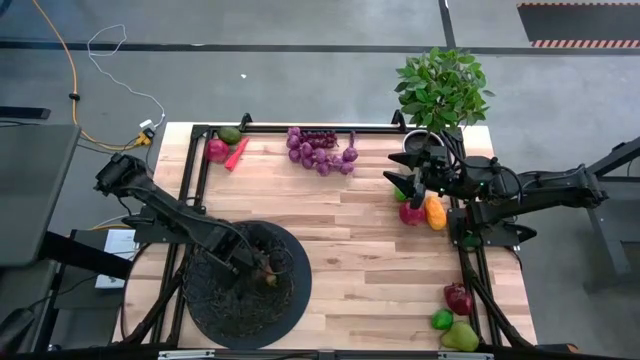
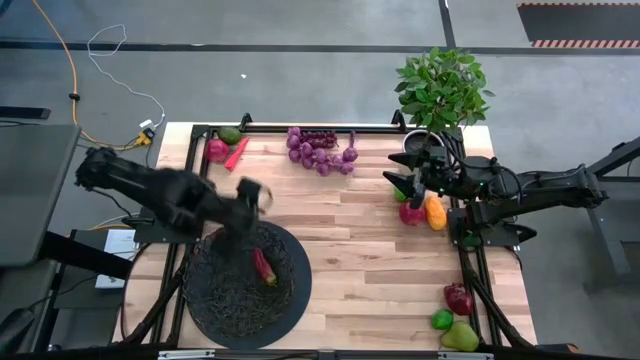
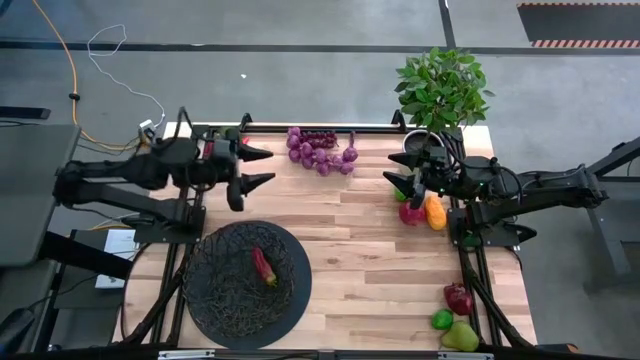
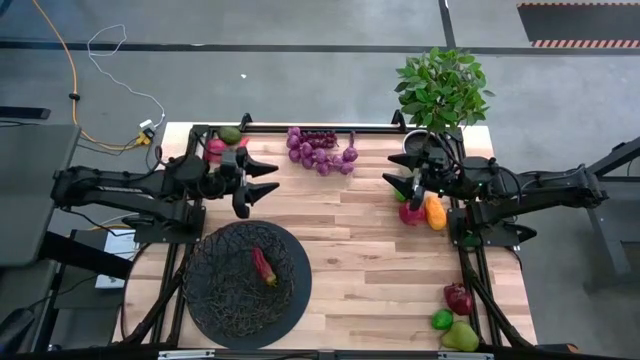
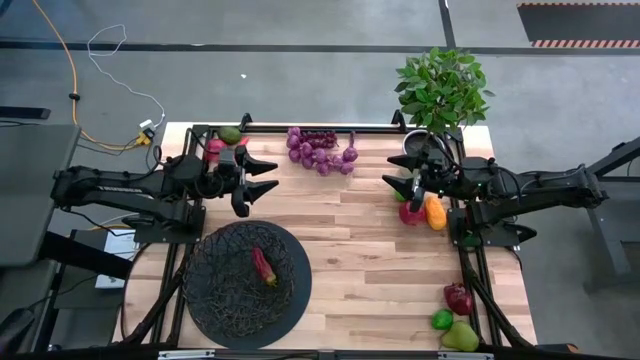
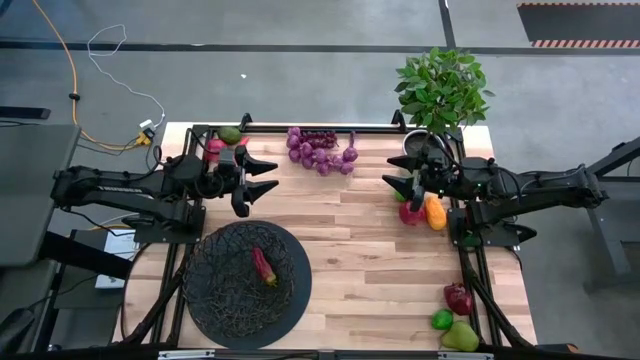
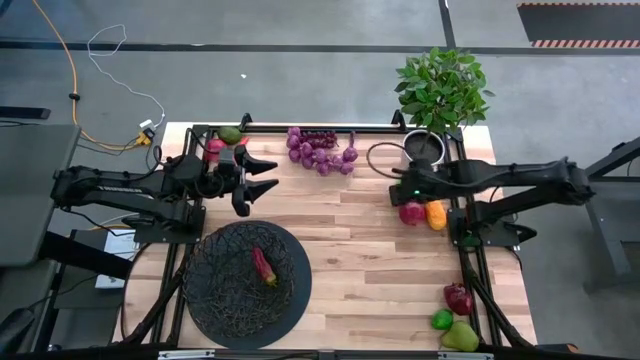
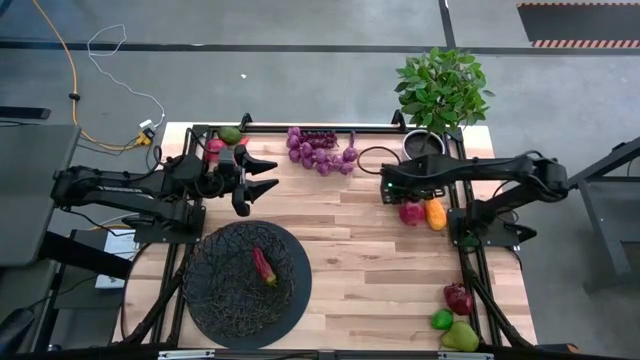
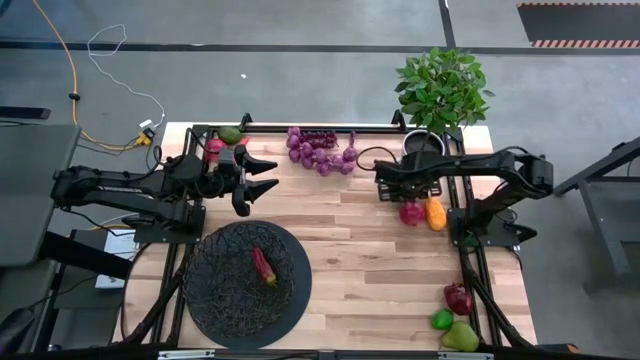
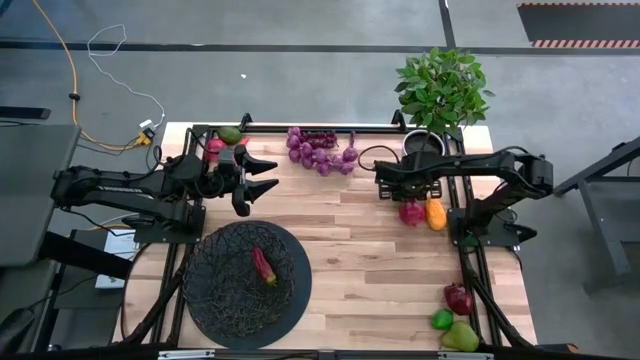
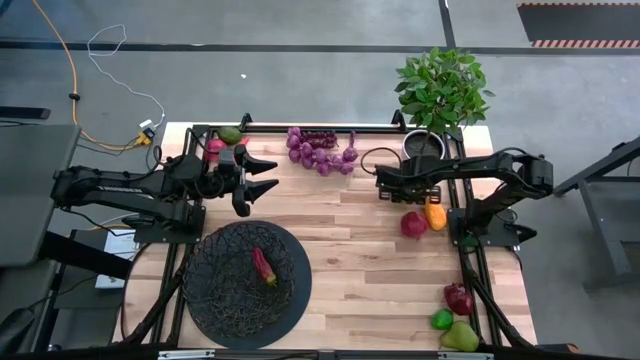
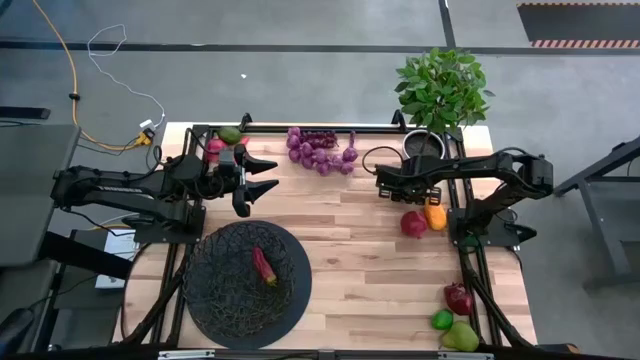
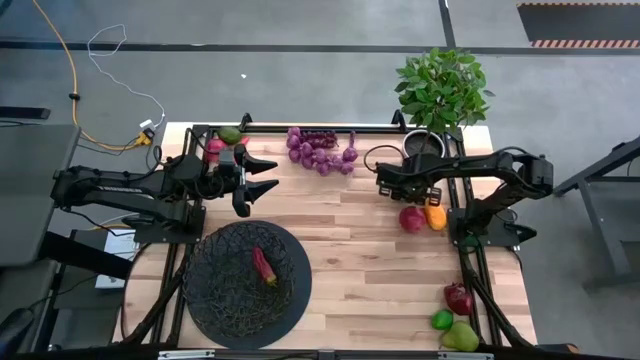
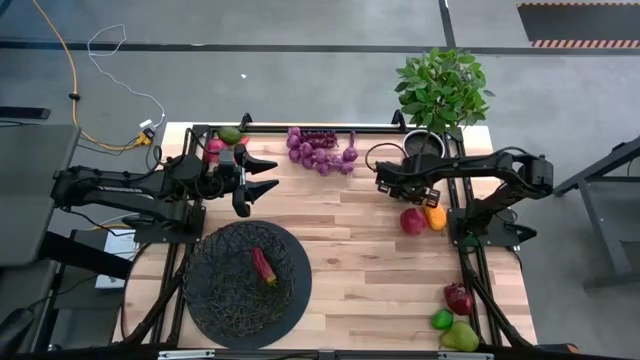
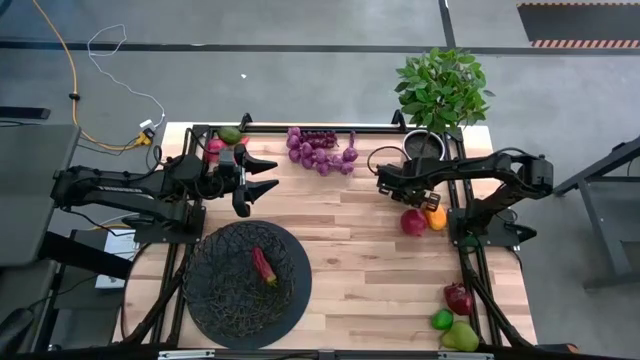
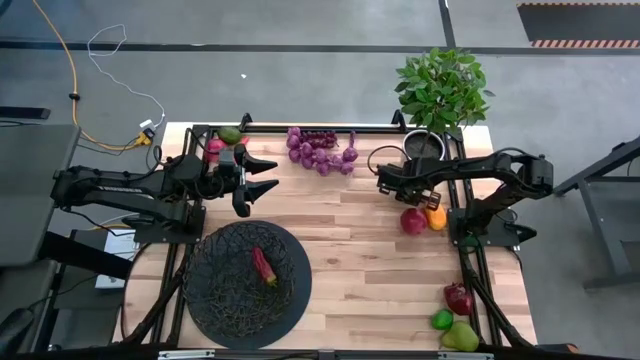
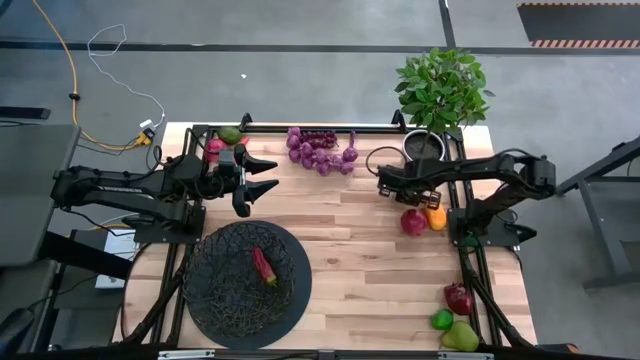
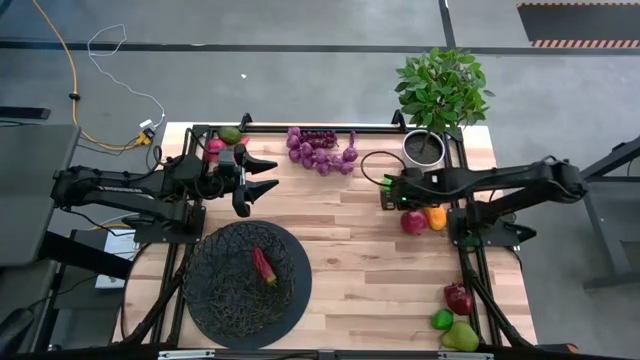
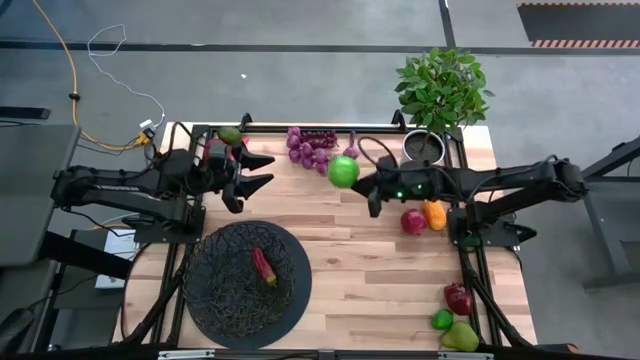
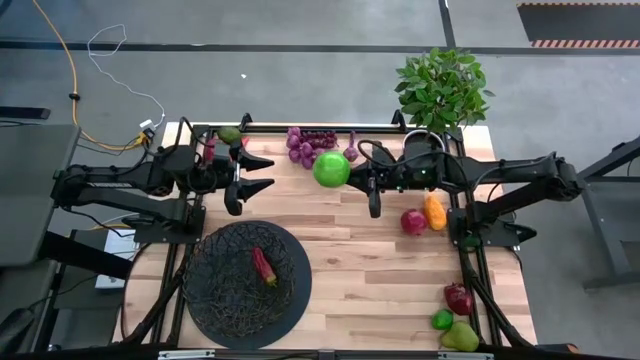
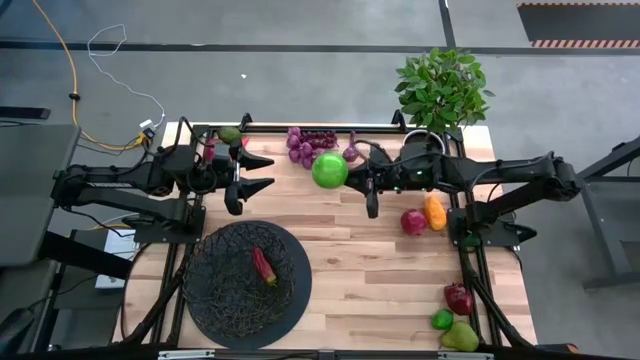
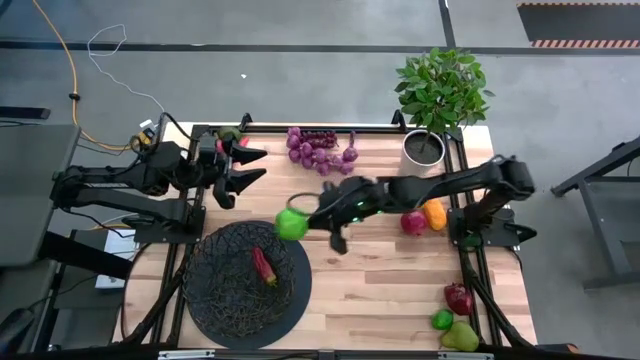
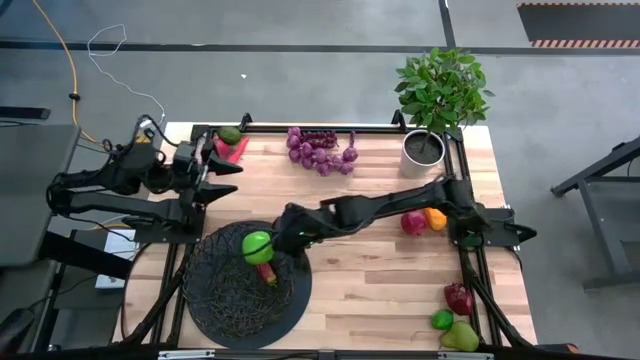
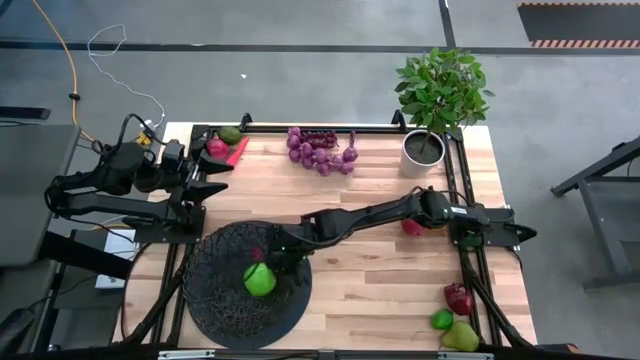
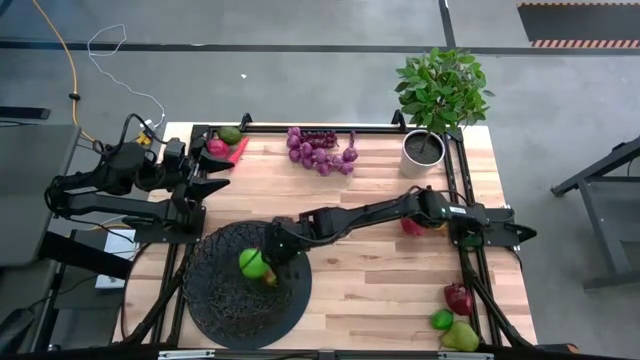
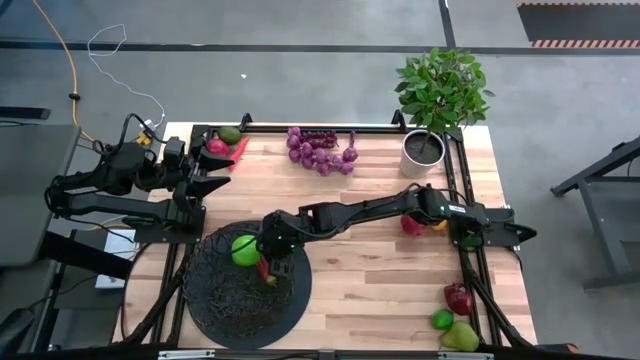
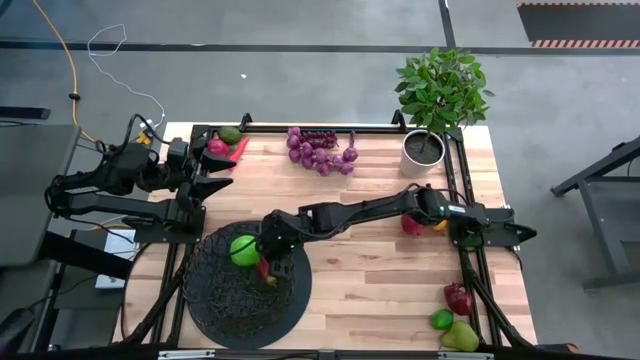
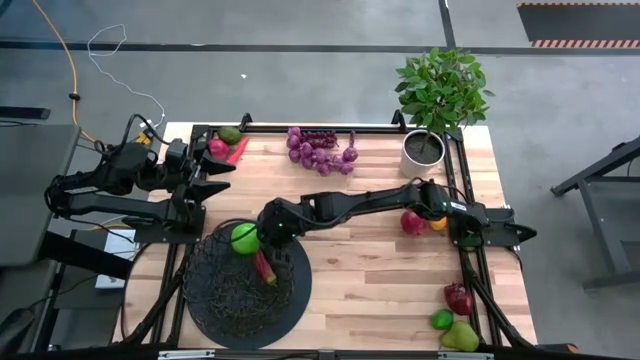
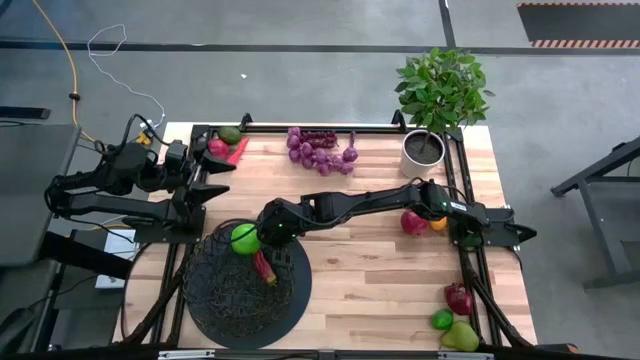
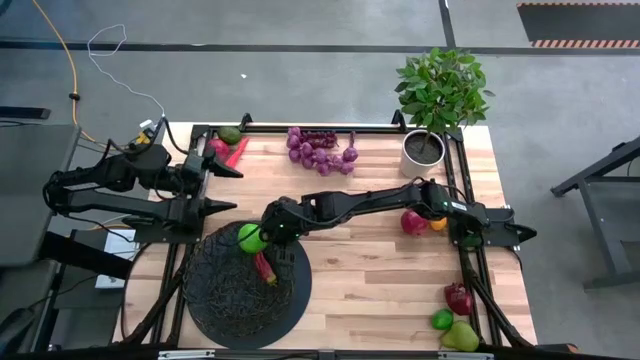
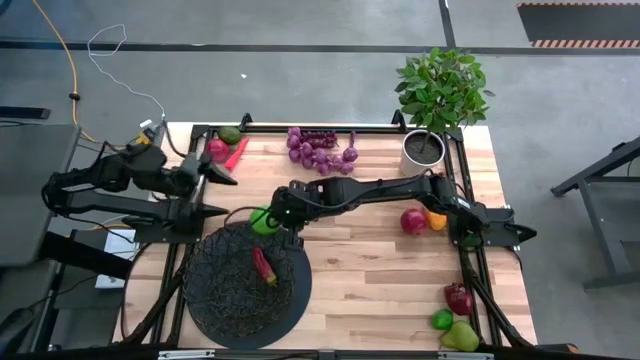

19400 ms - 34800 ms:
Task: Build produce basket
Put the green apple into the black basket

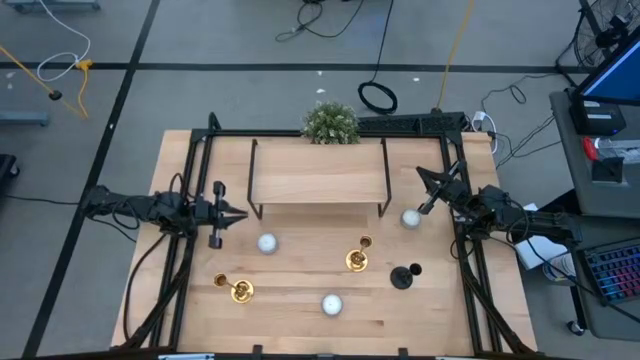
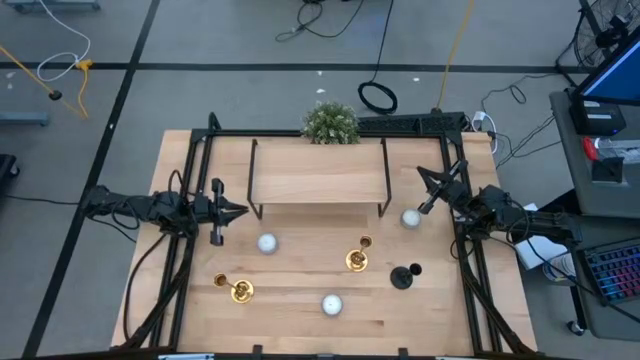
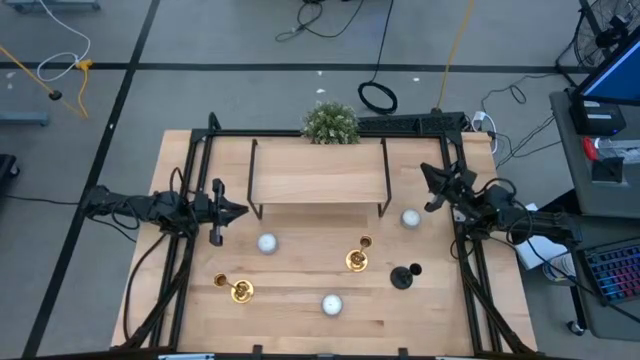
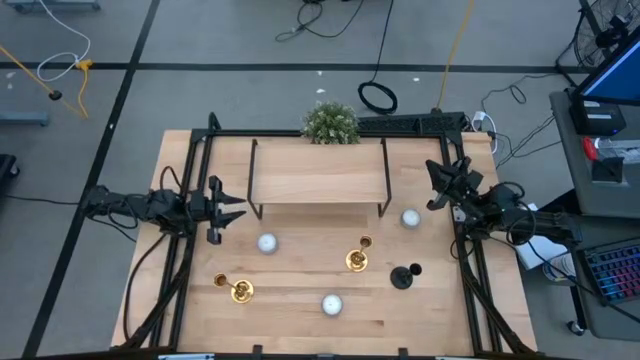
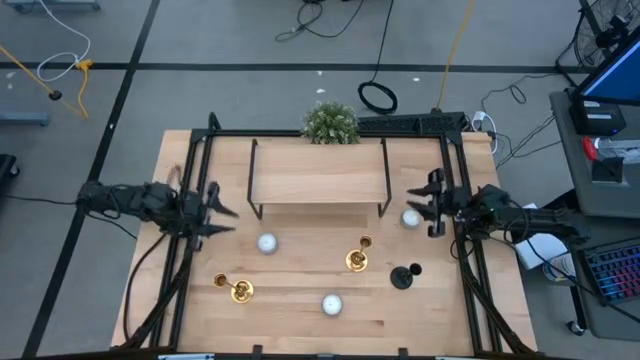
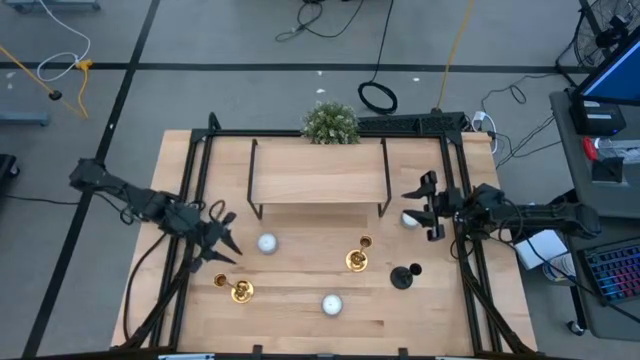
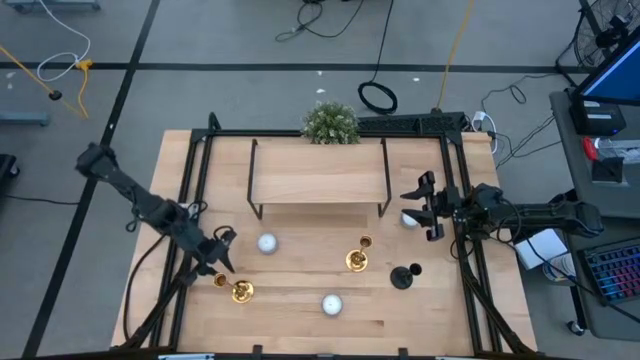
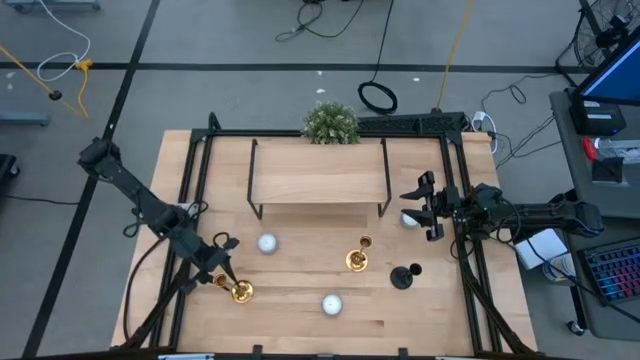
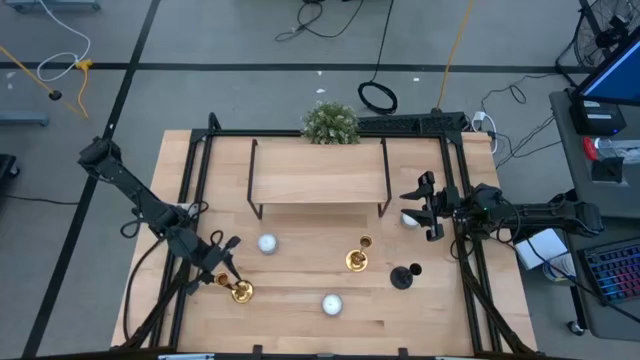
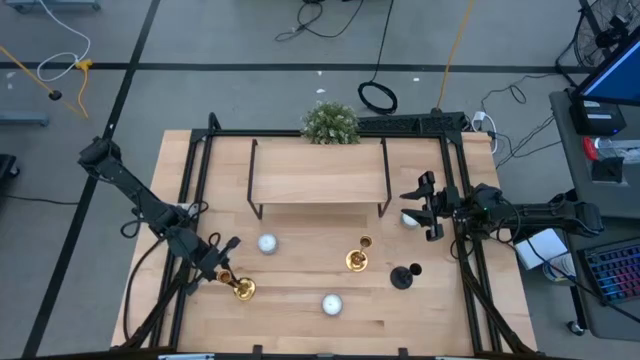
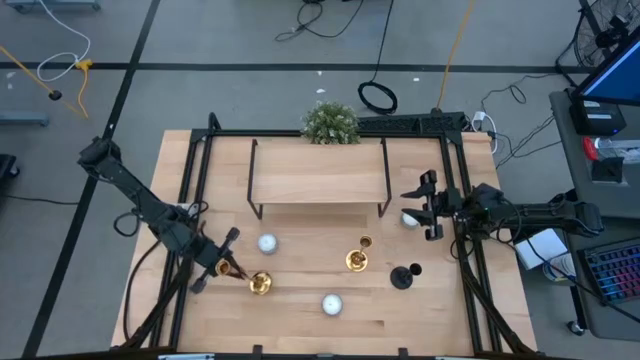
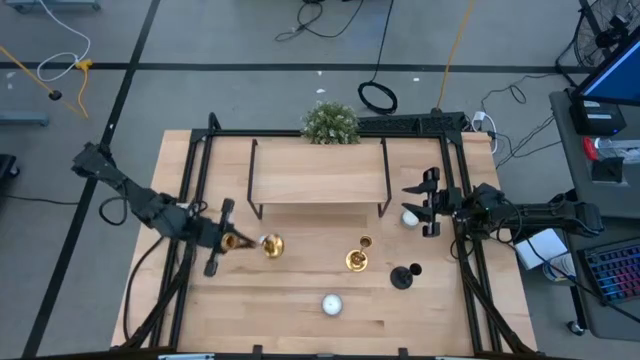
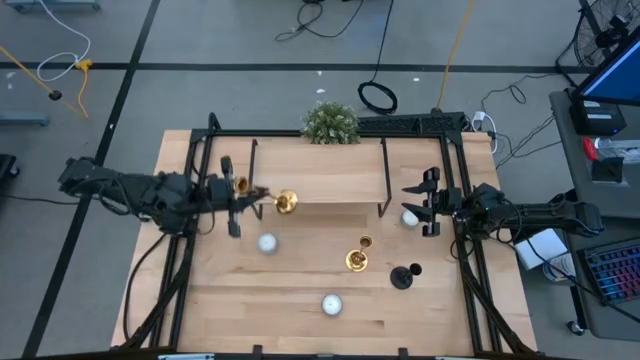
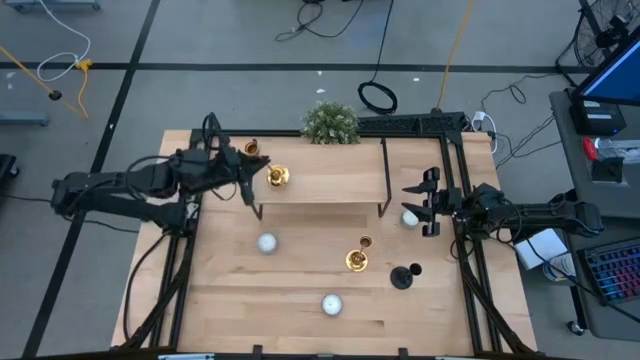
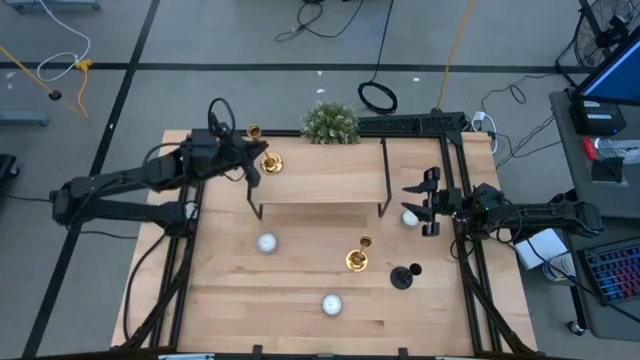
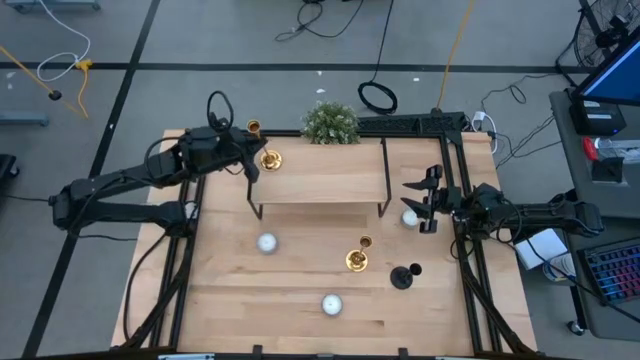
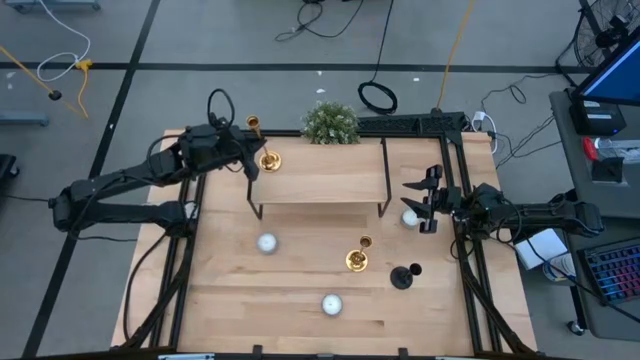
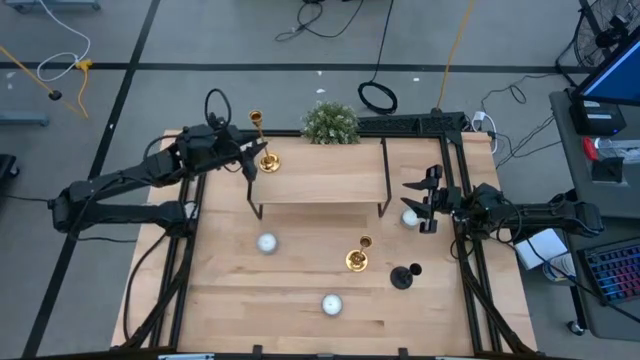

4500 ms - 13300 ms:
Task: Pick & Place candle stick holders
Put the bottom gold candle holder on the shelf
